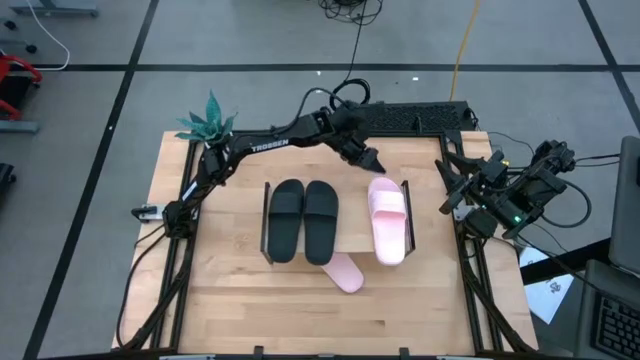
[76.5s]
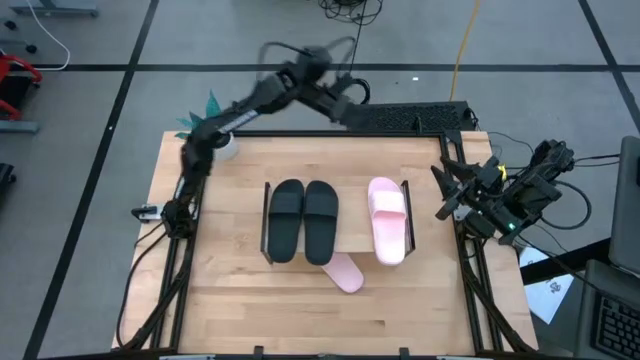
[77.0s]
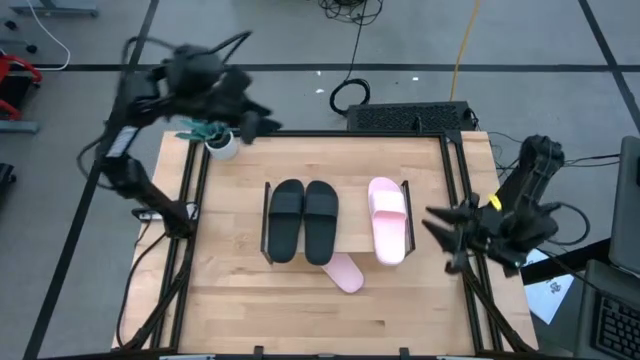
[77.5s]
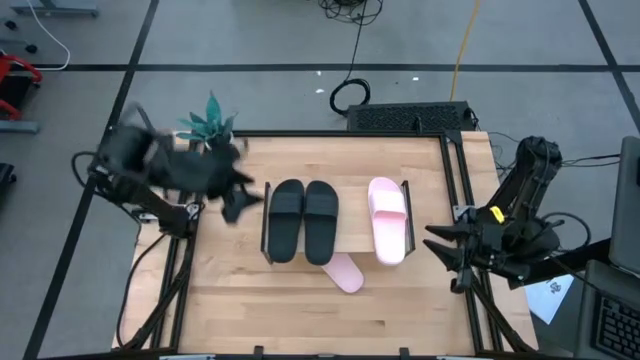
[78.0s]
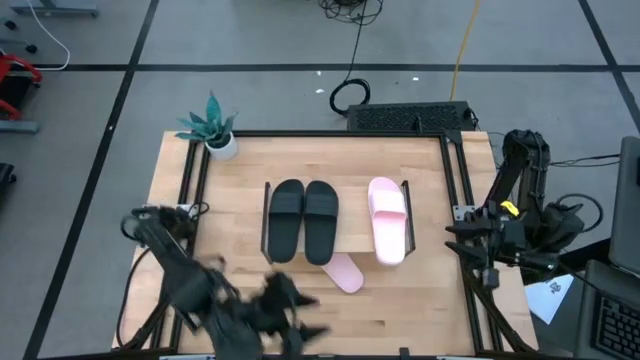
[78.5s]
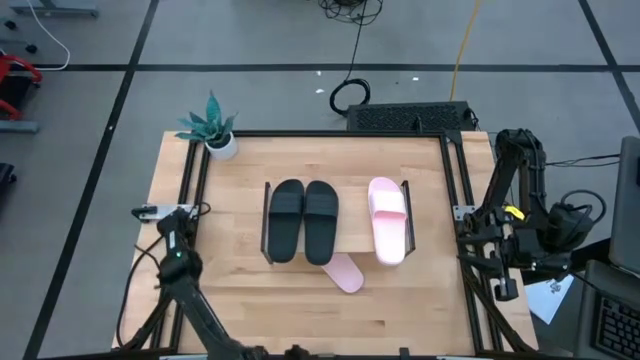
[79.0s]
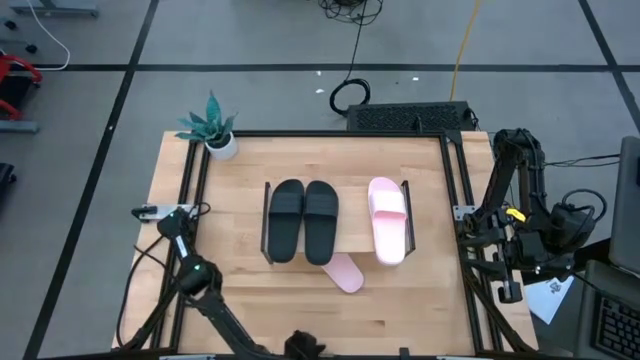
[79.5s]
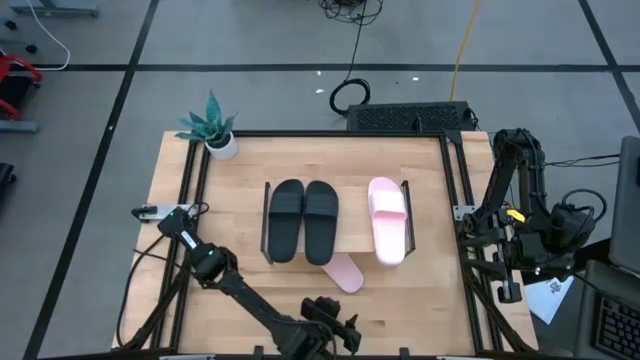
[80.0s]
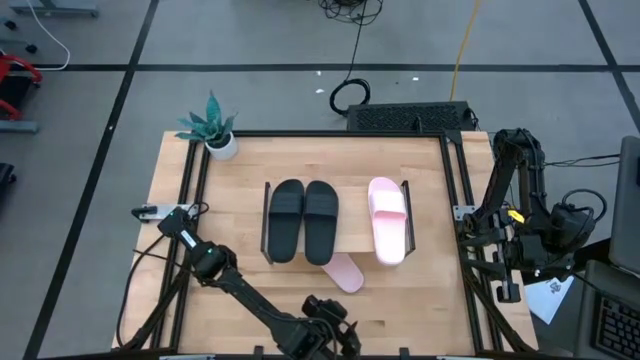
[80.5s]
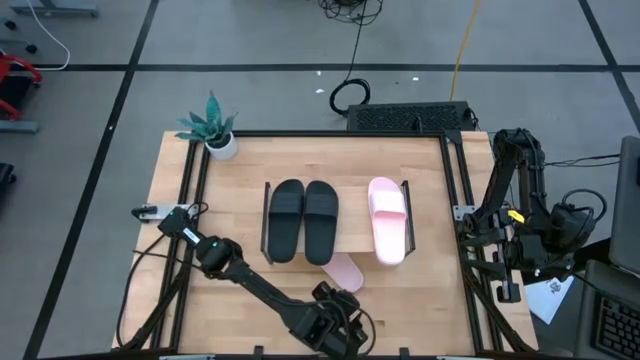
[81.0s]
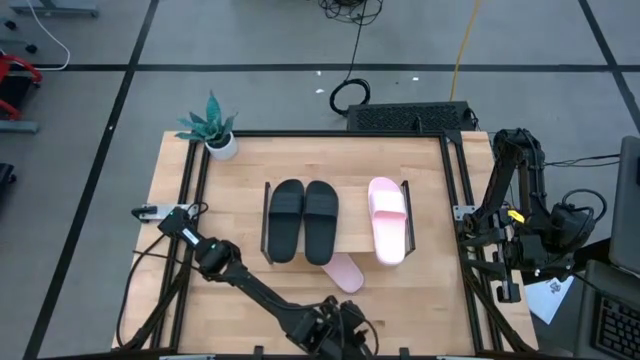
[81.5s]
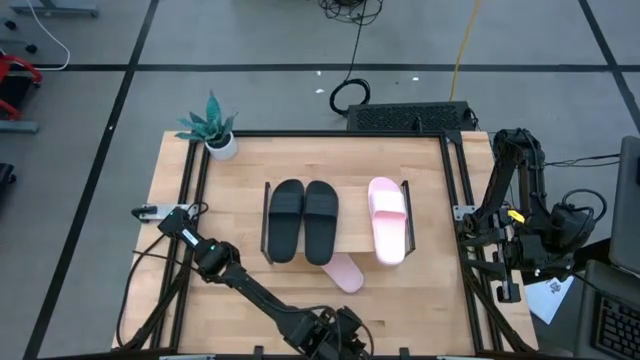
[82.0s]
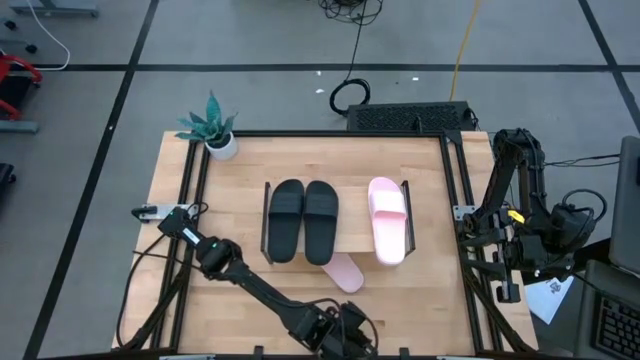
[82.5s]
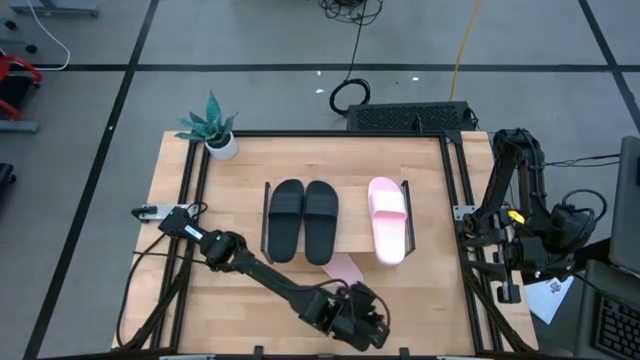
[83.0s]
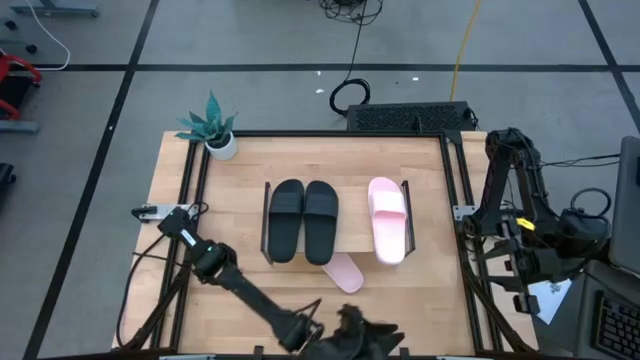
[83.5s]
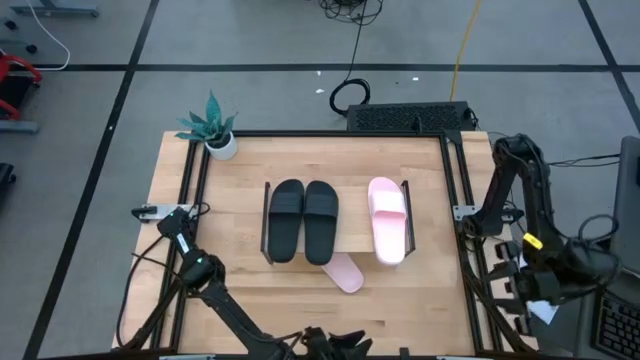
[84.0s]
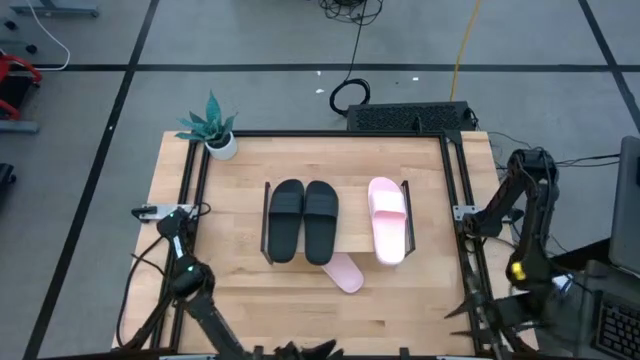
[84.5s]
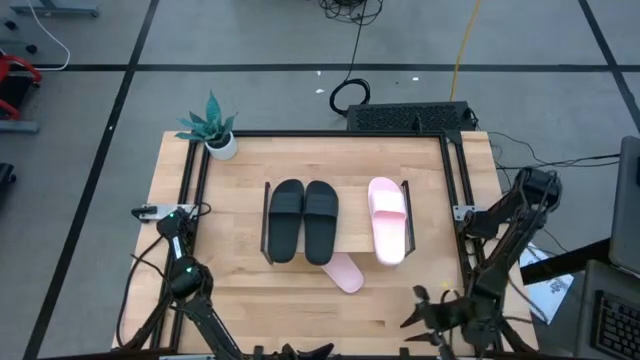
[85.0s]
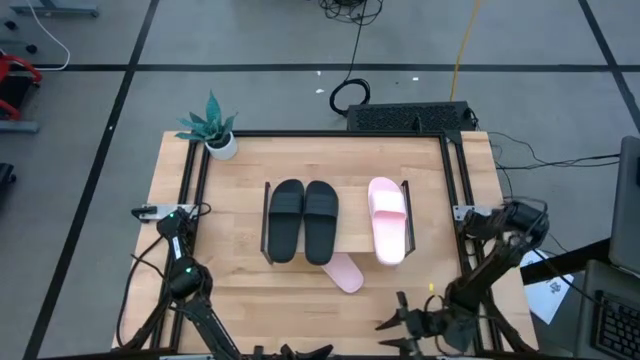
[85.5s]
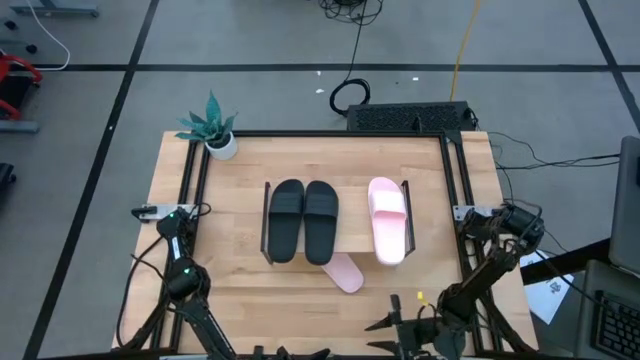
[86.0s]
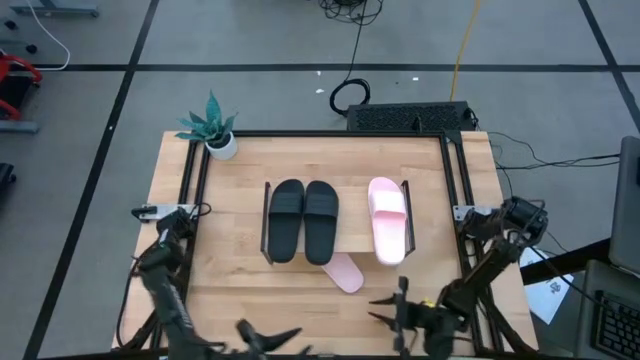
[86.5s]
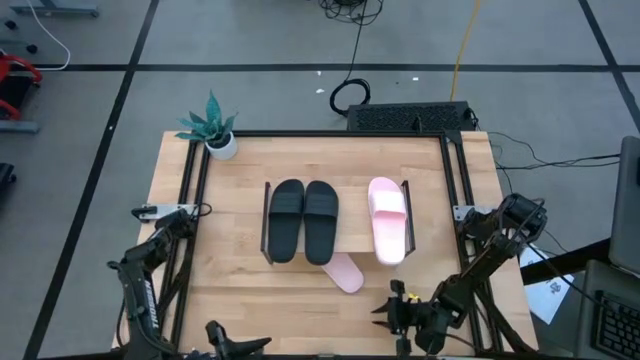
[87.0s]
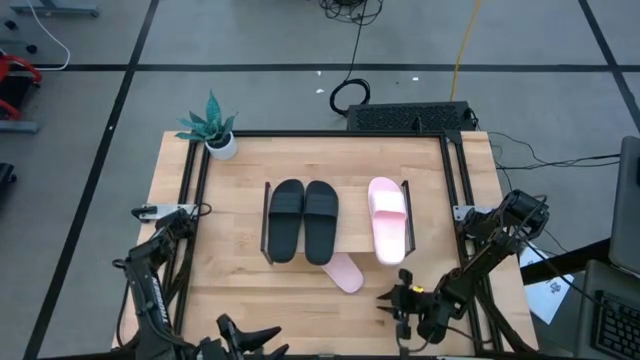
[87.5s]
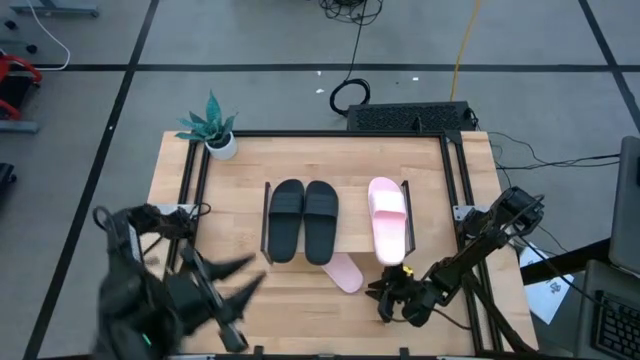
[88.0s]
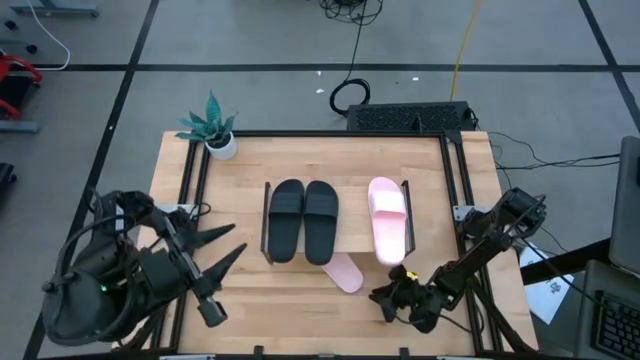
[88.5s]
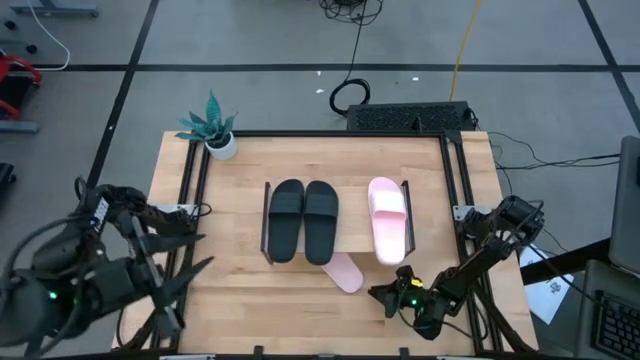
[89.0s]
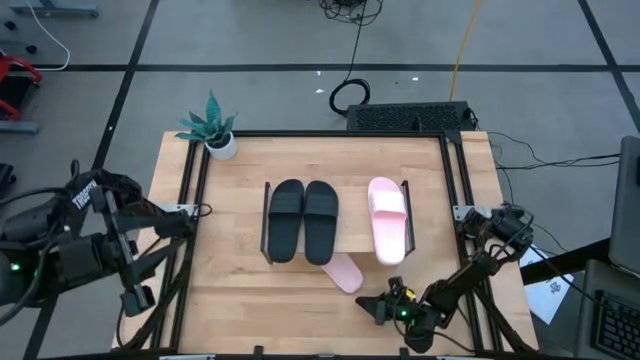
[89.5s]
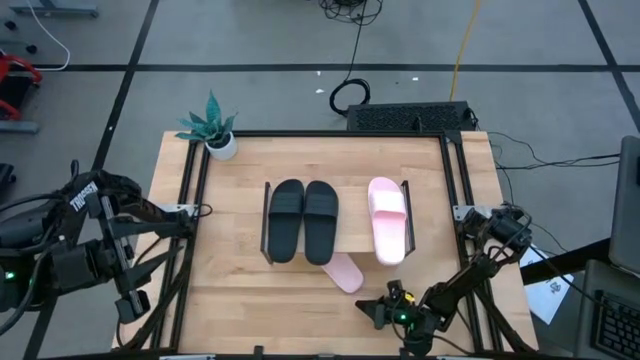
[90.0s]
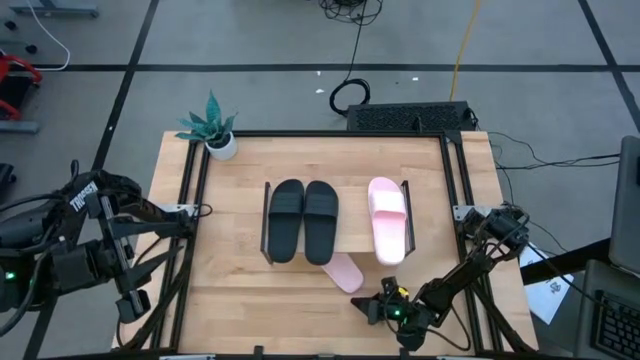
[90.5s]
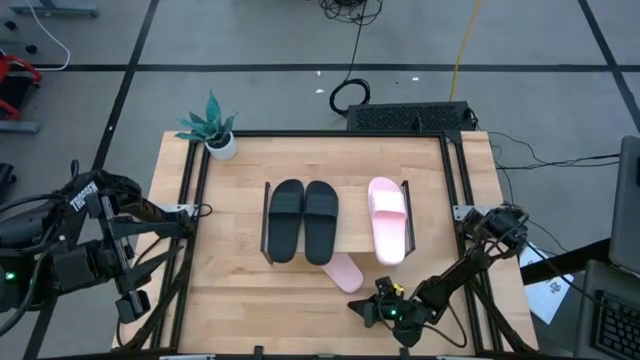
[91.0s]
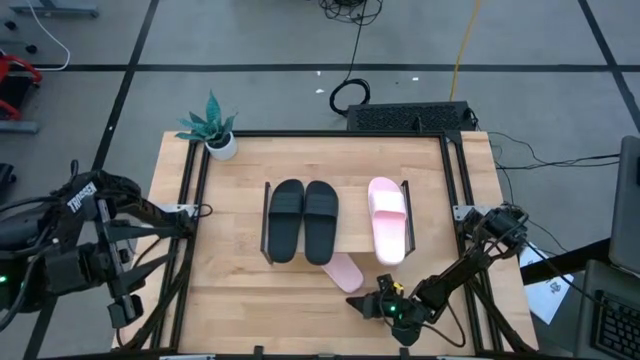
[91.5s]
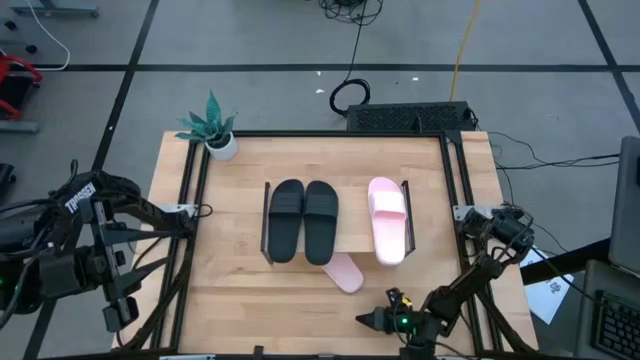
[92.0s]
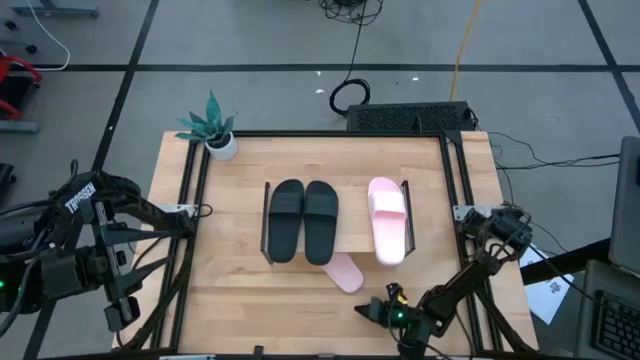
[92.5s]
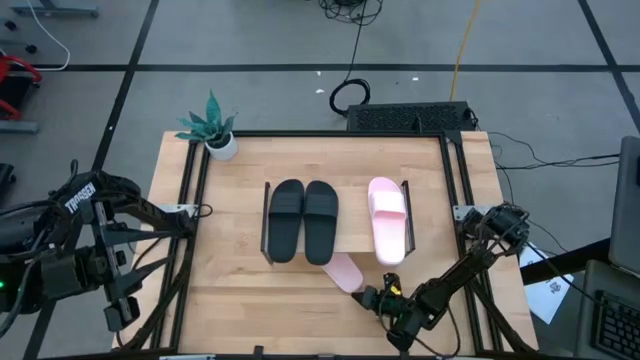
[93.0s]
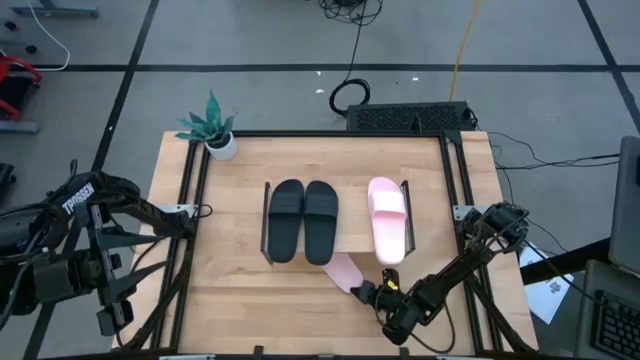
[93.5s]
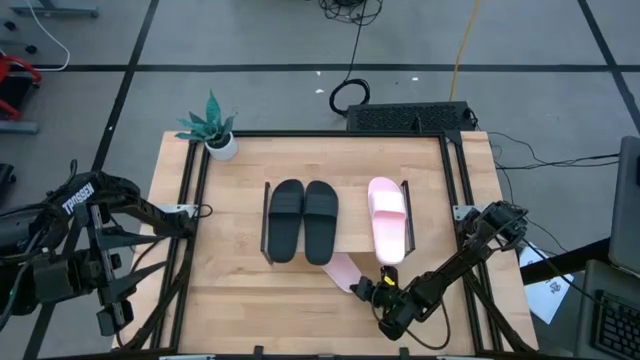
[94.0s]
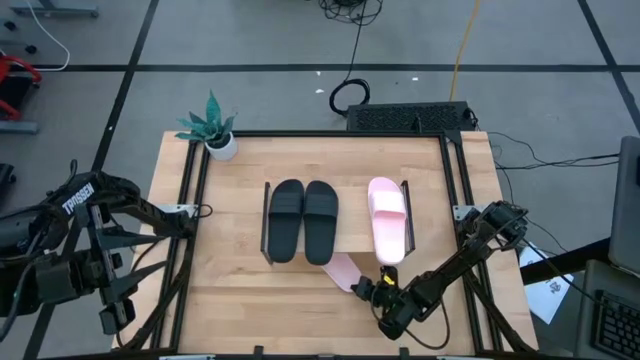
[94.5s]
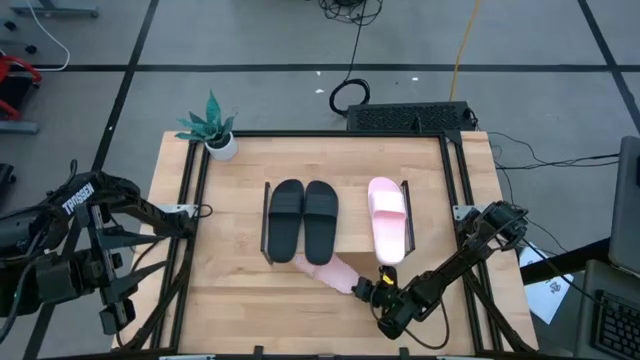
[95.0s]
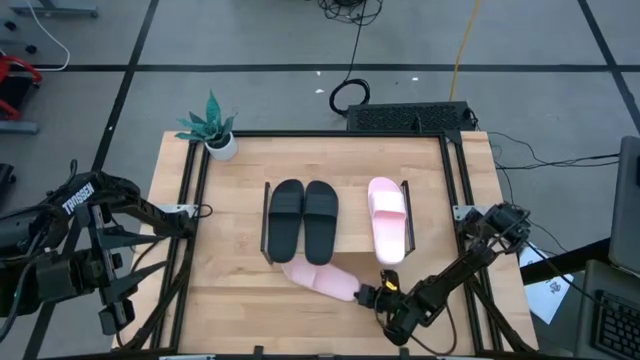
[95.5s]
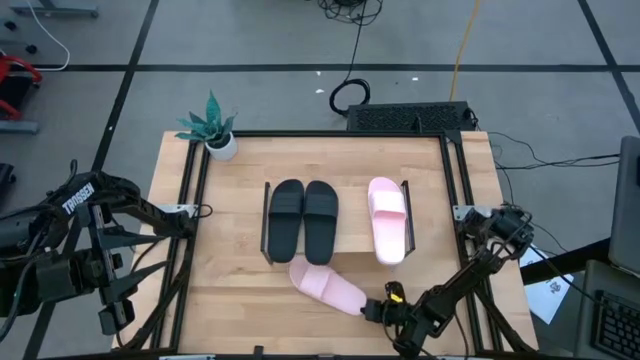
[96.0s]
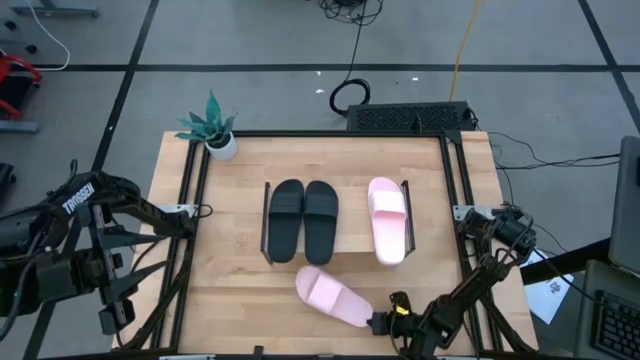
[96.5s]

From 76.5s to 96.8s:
Task: Pick and place slides into the shelf
Put the pink slipper on the shelf

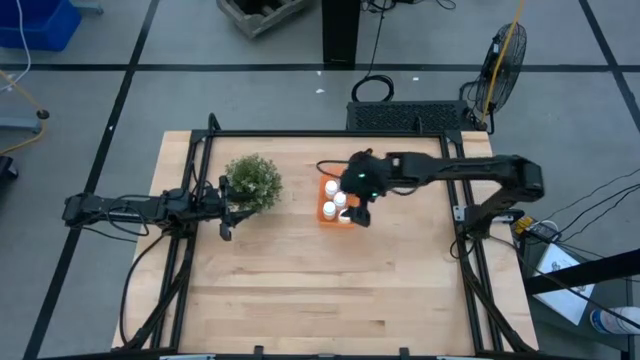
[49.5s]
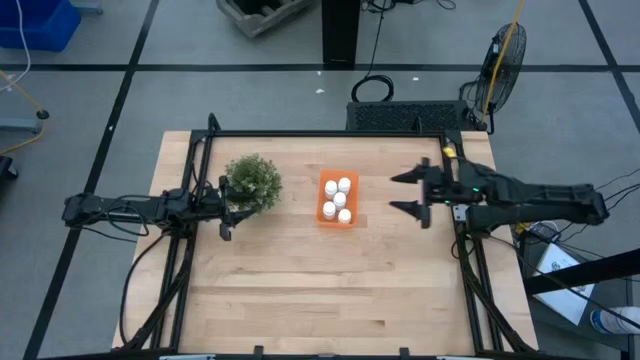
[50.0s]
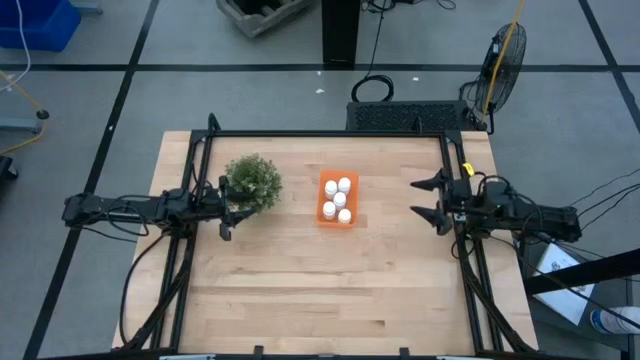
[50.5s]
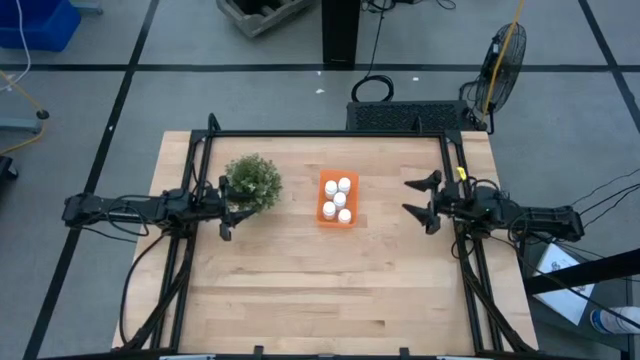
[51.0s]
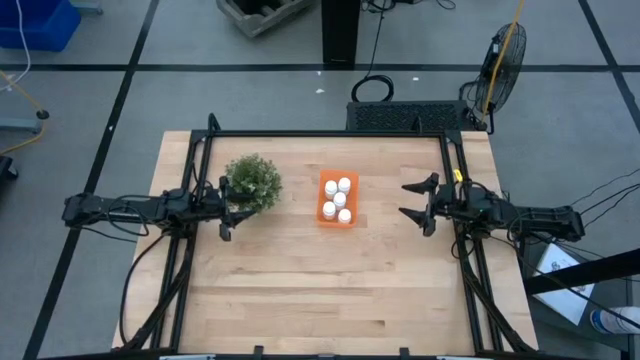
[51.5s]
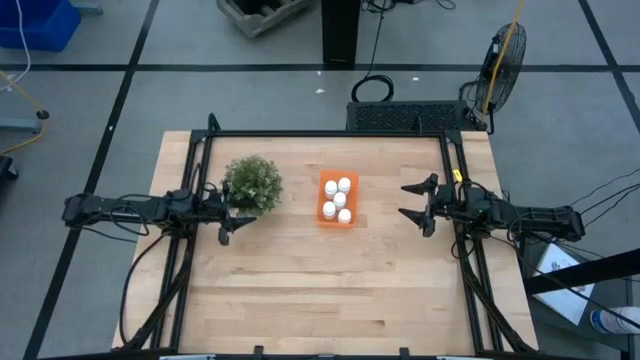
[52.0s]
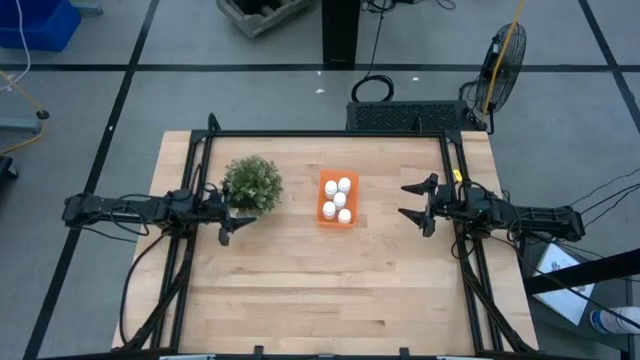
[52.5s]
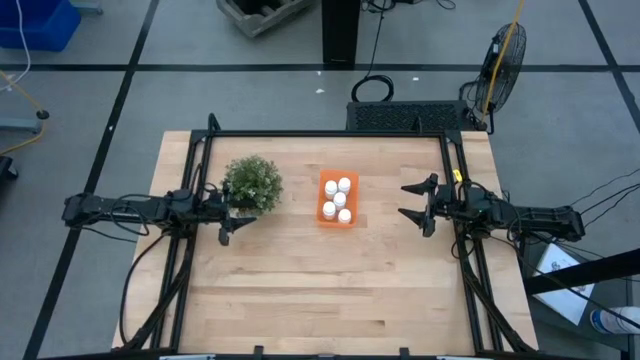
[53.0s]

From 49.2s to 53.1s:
Task: Pick and place pill bottles into a basket
Return to Home Position
